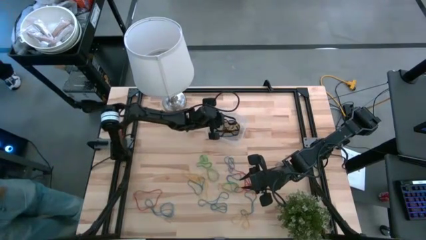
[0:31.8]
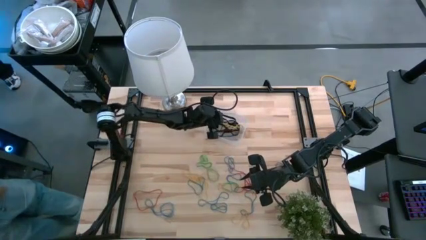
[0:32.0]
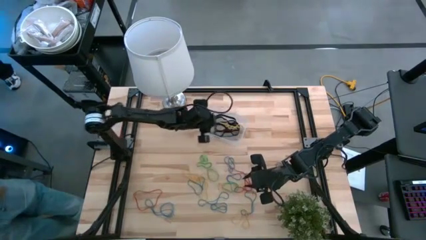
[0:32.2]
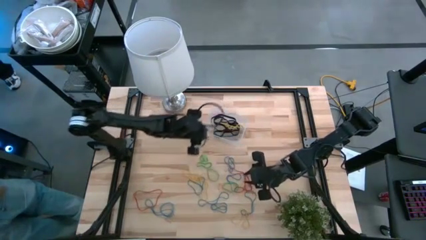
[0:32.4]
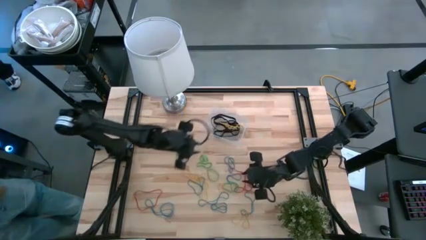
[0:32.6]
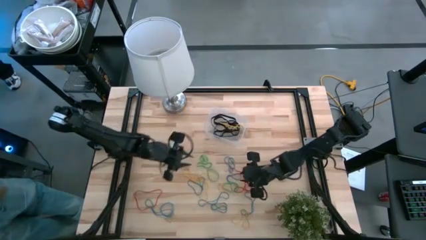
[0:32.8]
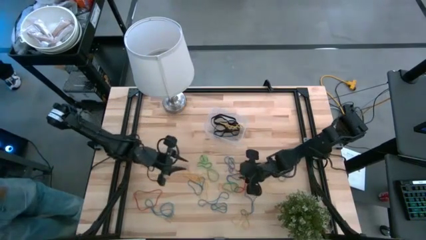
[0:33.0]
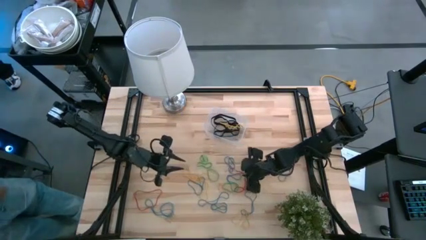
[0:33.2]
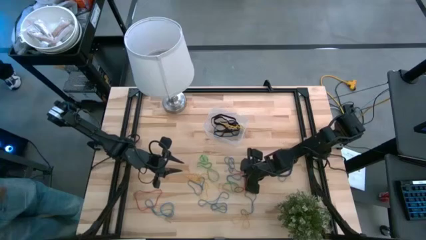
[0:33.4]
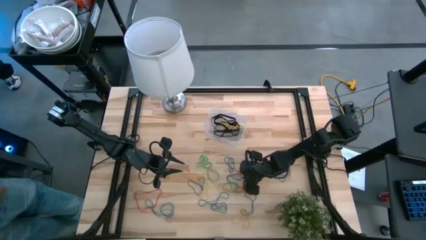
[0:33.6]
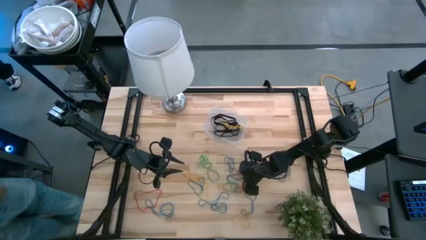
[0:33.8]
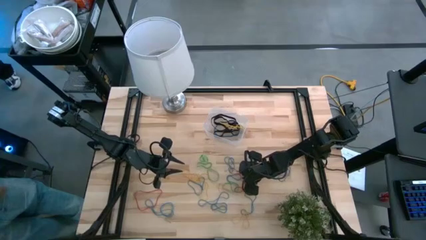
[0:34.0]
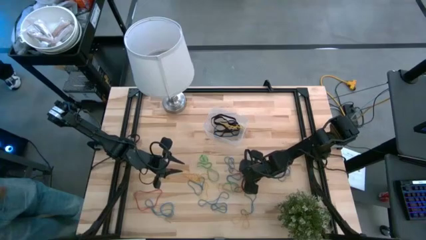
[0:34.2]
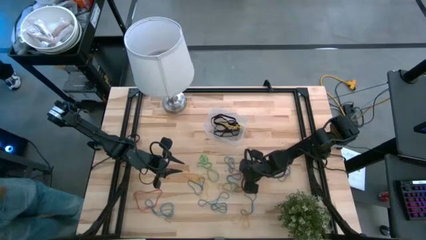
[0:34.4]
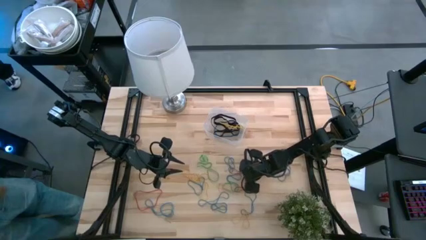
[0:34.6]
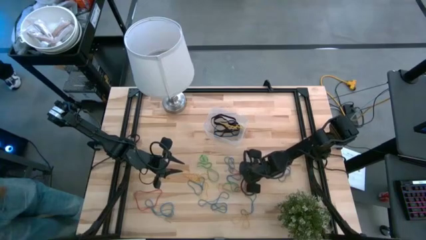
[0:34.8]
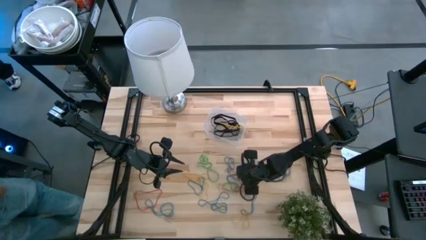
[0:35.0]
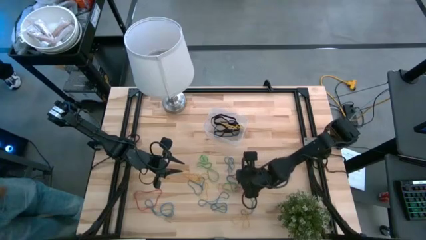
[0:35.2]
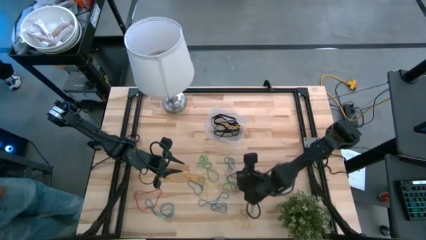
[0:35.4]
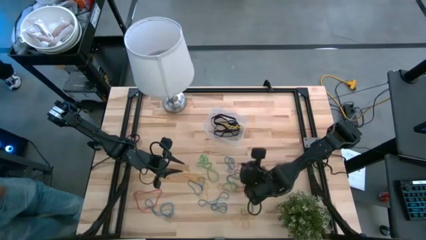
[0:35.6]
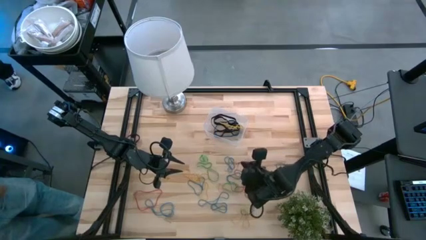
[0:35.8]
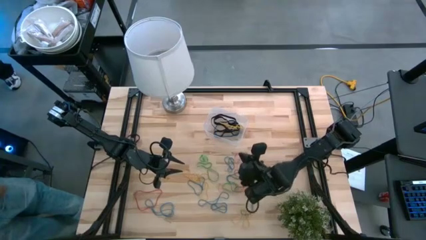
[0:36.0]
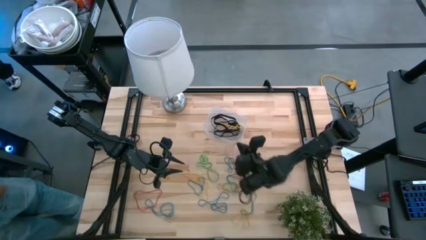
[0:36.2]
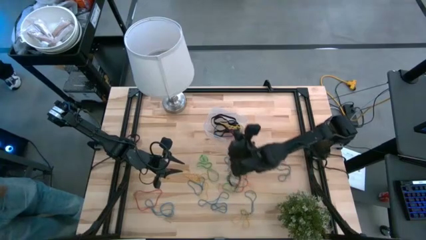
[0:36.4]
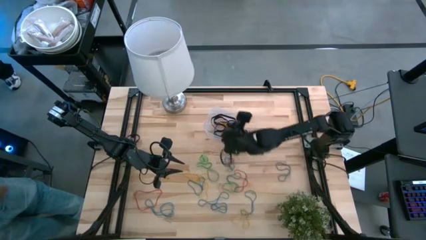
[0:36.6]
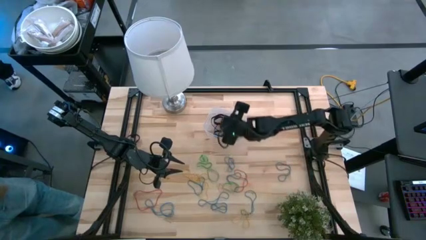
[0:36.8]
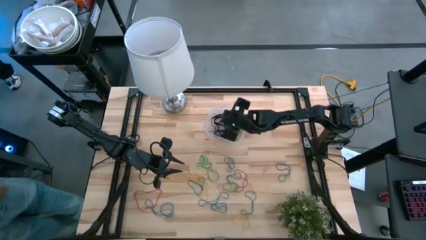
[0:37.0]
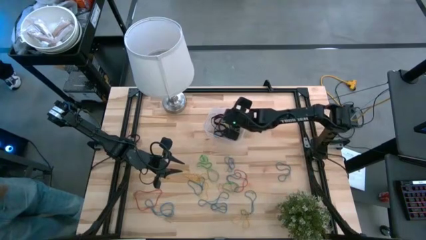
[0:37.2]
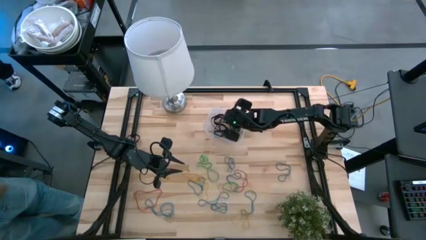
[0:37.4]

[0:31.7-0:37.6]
Task: Pick and place rubber bands into bin
Put the red rubber bands into the bin

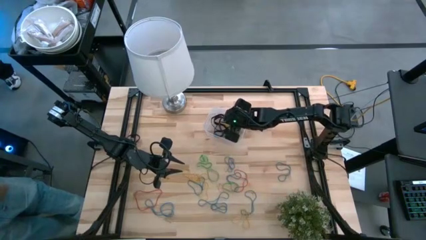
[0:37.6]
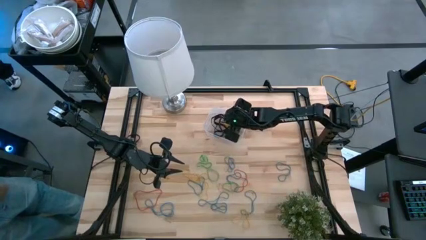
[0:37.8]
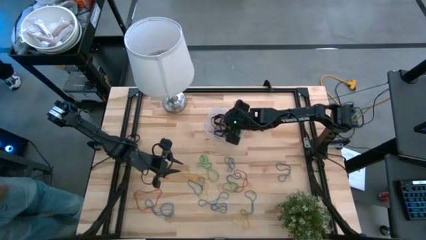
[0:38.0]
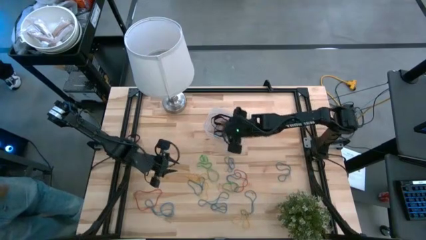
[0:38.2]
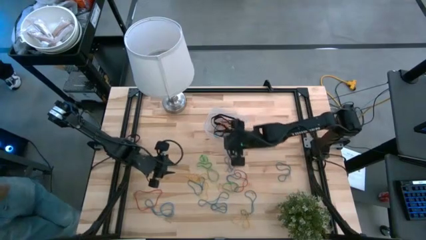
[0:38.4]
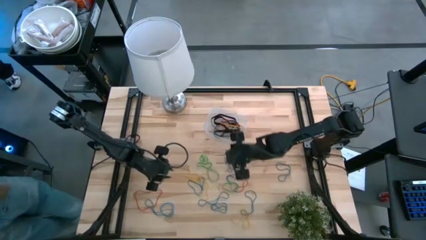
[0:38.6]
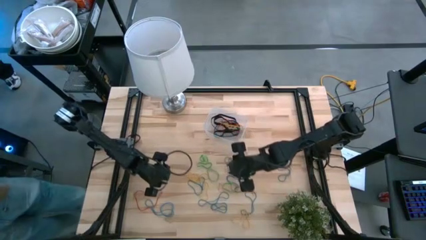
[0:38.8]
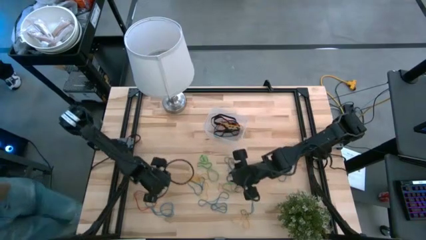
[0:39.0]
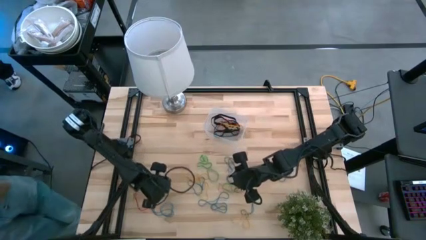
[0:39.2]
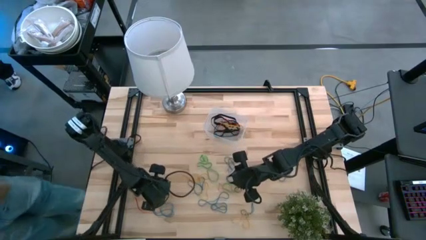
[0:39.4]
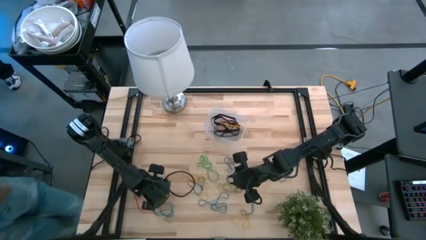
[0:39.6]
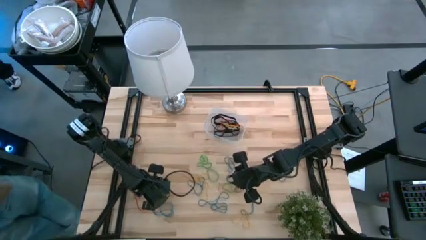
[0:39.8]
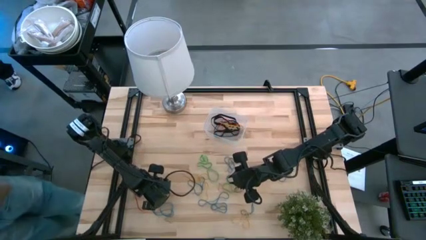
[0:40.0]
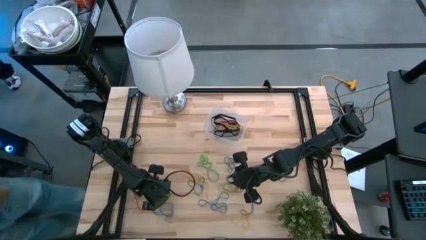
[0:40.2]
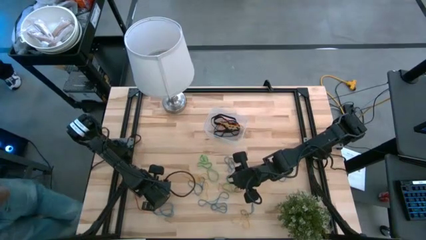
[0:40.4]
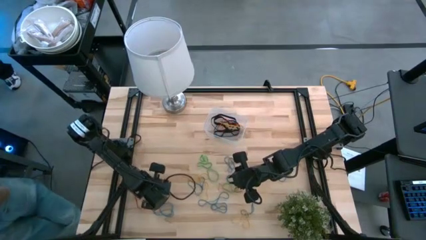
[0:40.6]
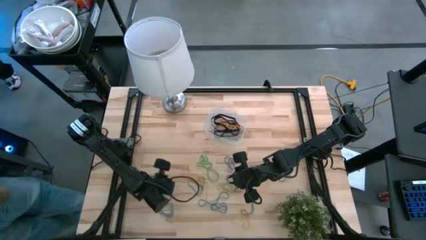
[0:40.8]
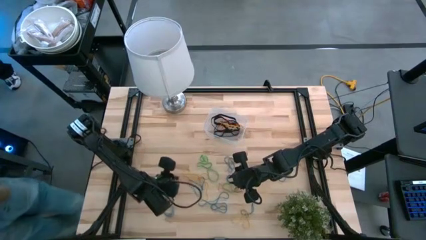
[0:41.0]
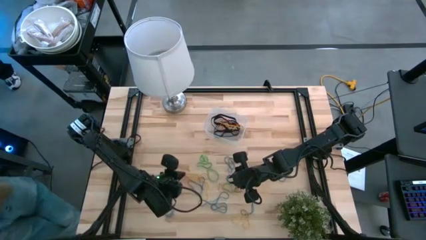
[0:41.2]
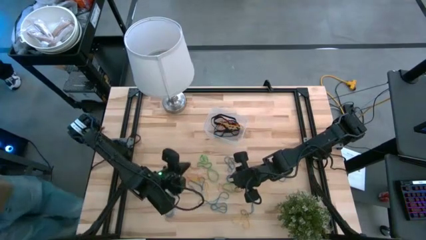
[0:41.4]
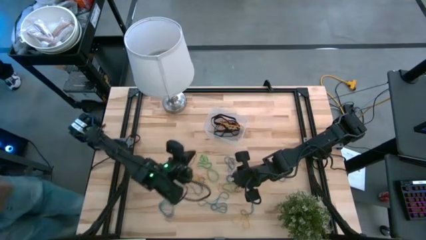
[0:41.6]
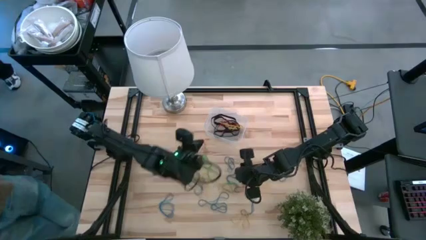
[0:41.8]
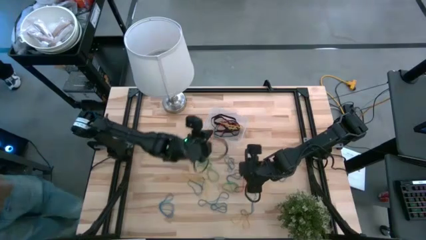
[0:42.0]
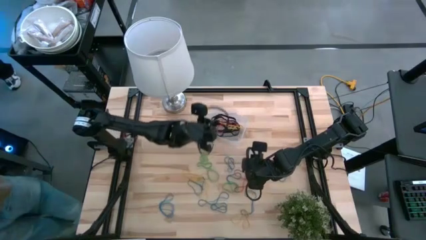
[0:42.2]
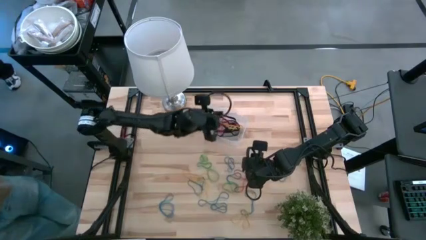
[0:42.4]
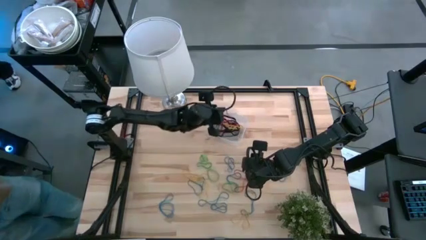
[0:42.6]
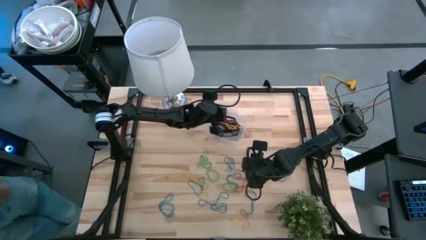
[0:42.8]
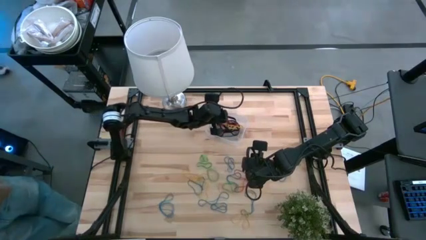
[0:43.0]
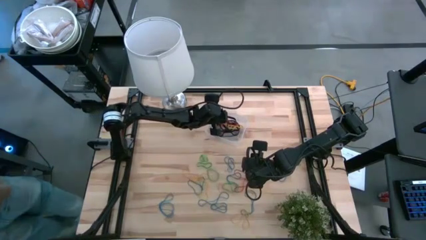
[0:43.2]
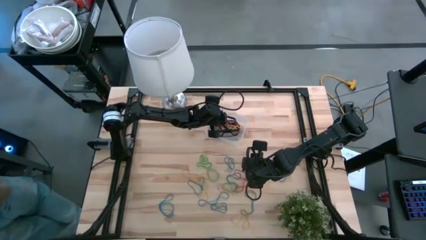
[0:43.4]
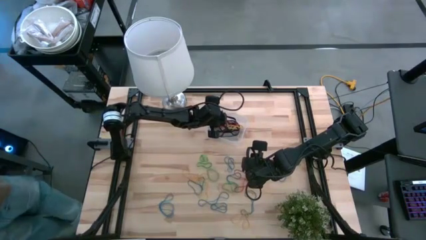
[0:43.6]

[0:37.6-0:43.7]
Put the red rubber bands into the bin

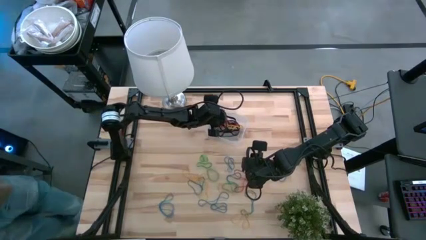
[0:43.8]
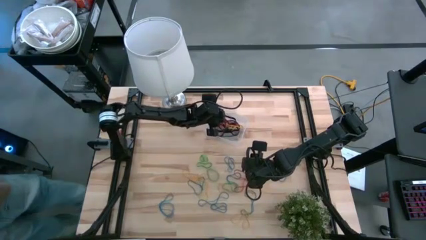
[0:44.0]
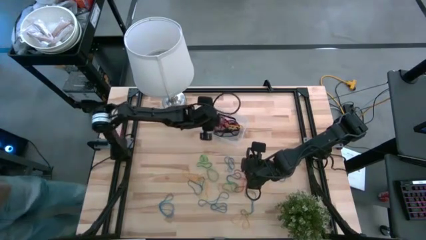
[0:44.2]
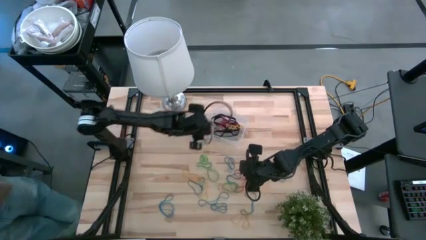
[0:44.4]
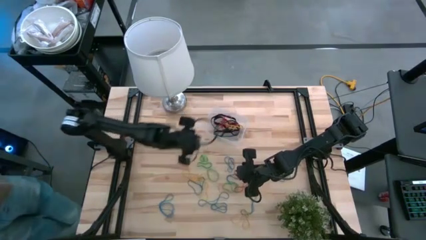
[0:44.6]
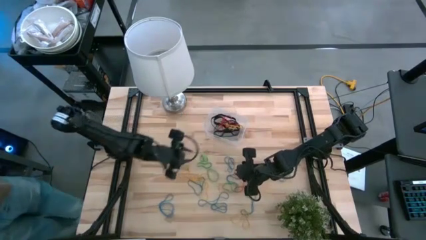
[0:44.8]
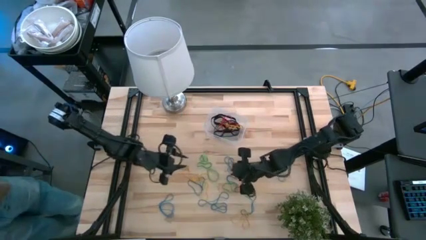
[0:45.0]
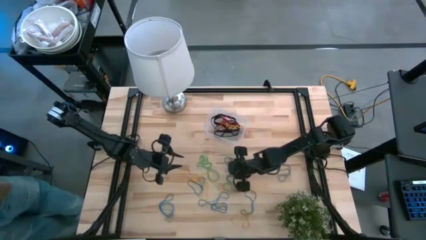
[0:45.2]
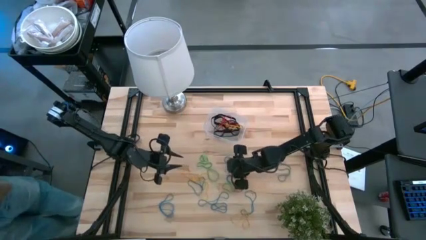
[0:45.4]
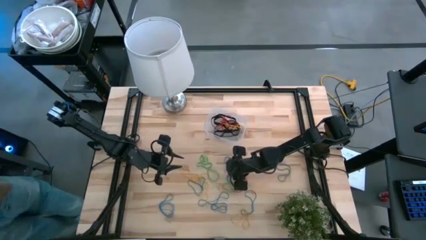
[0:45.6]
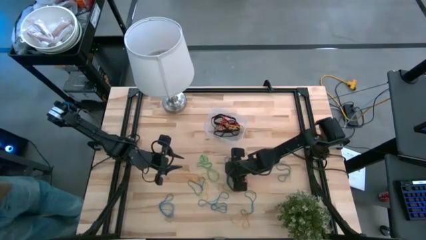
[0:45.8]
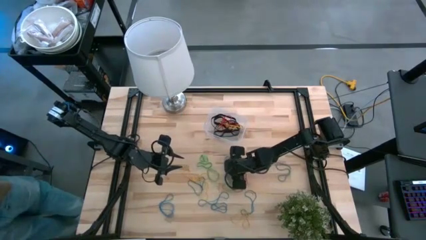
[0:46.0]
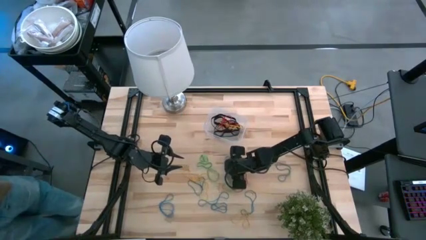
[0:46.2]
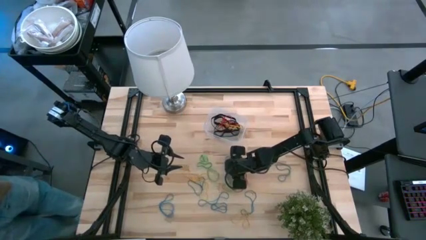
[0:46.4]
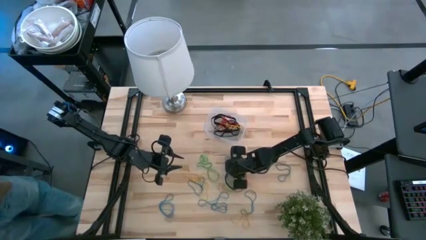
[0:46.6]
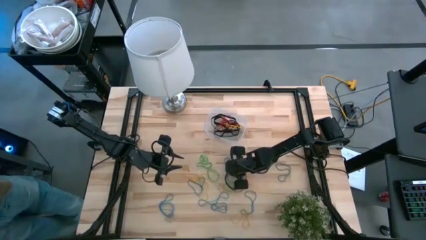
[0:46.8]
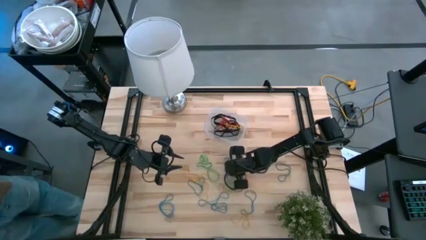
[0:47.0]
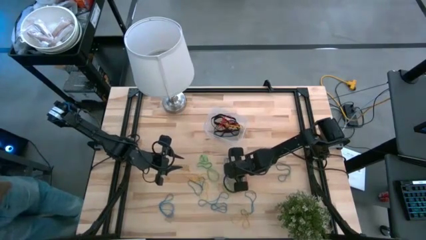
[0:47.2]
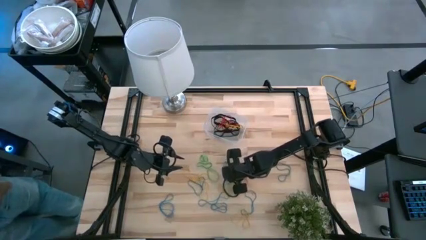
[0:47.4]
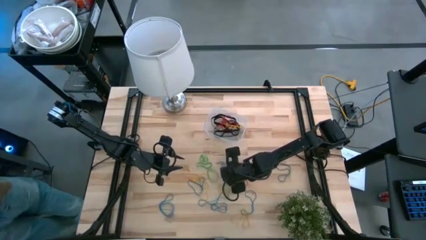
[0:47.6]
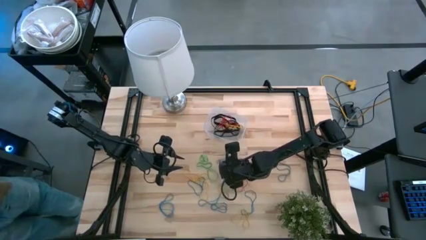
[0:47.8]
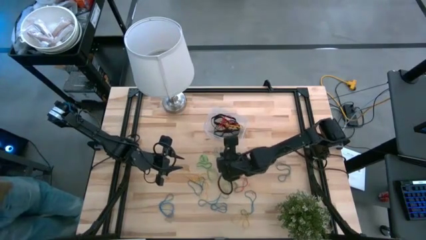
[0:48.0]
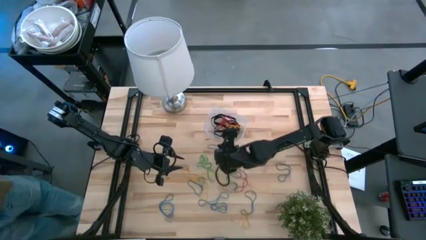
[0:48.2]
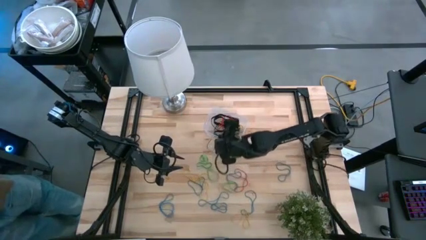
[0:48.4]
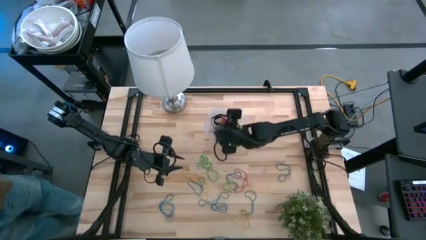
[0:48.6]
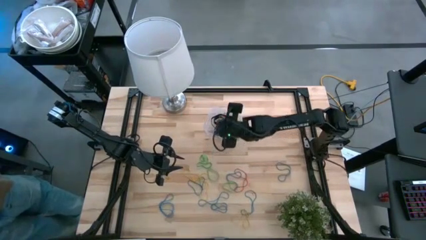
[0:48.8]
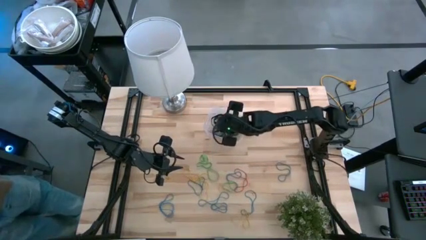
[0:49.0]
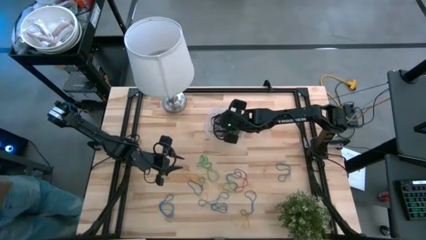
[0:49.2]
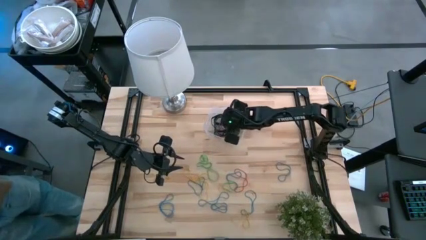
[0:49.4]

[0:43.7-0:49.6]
Put the blue rubber bands into the bin
